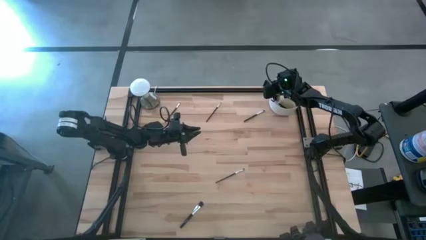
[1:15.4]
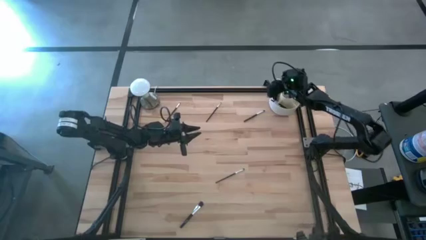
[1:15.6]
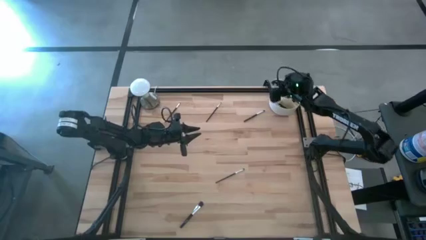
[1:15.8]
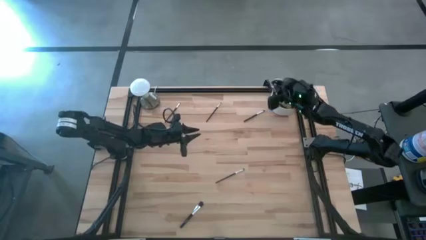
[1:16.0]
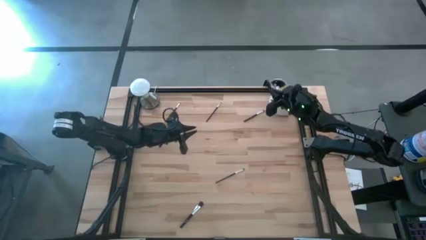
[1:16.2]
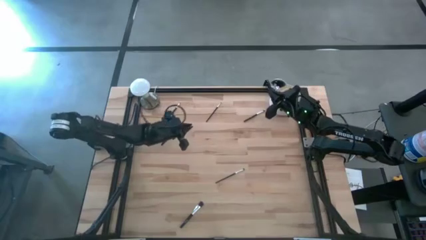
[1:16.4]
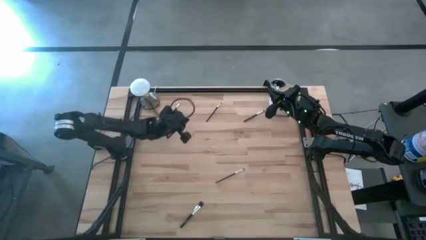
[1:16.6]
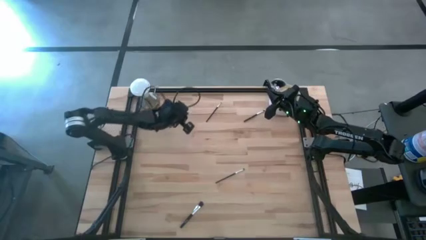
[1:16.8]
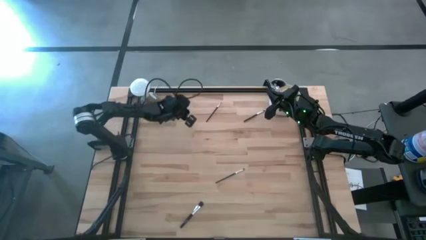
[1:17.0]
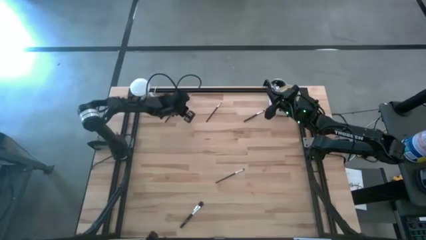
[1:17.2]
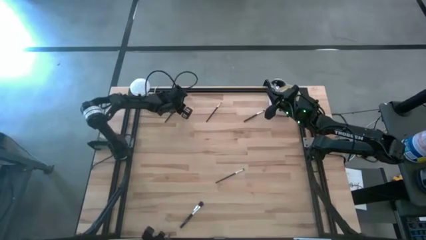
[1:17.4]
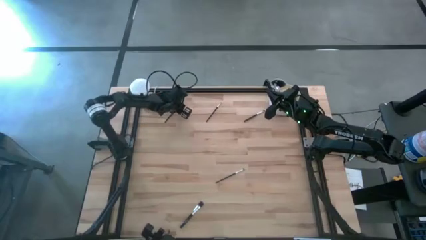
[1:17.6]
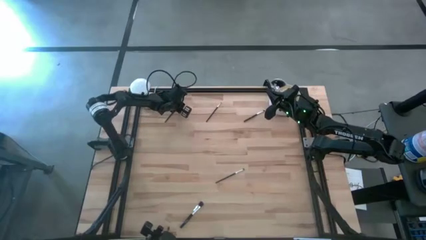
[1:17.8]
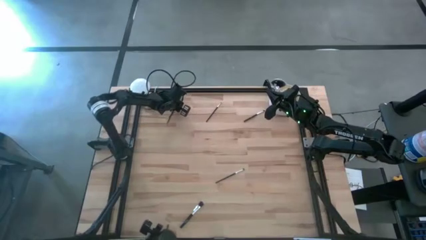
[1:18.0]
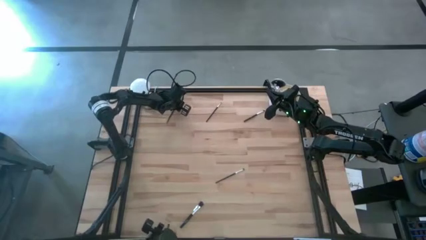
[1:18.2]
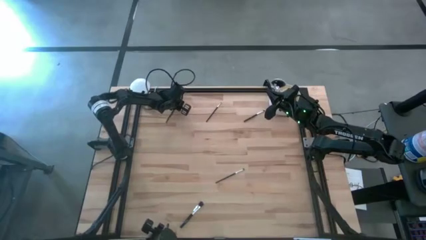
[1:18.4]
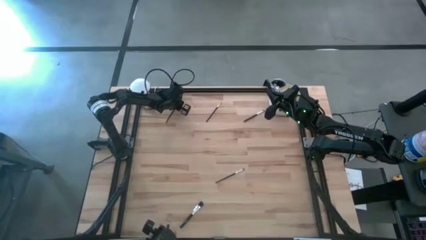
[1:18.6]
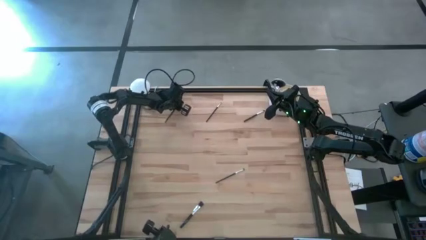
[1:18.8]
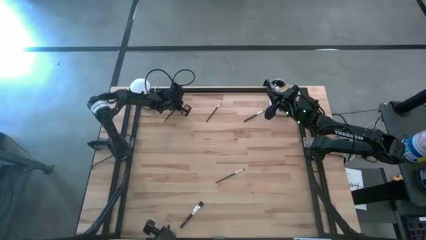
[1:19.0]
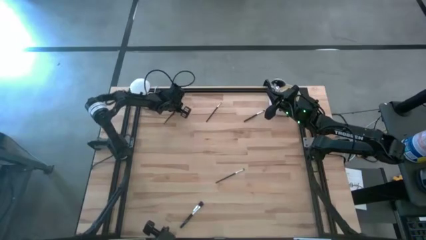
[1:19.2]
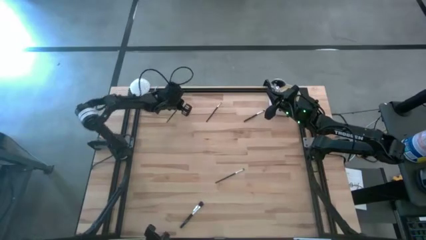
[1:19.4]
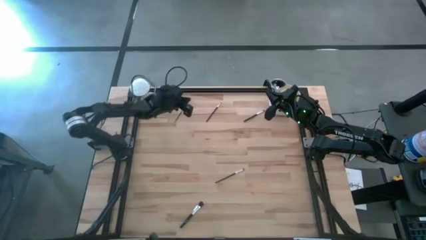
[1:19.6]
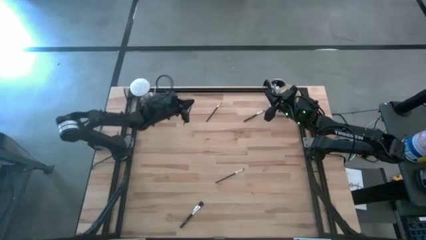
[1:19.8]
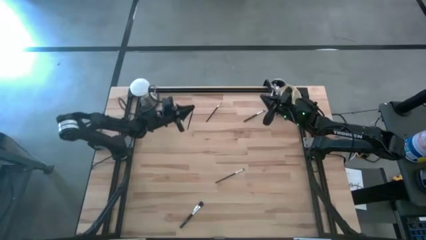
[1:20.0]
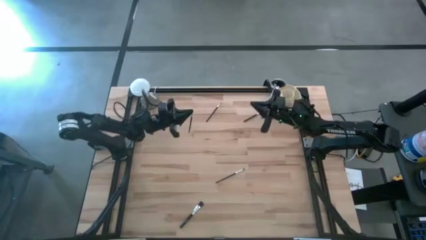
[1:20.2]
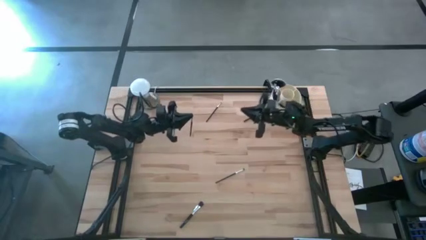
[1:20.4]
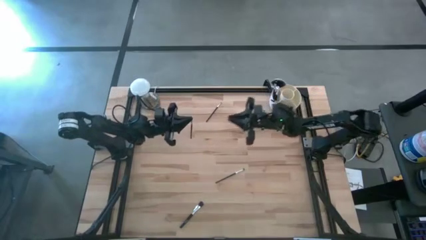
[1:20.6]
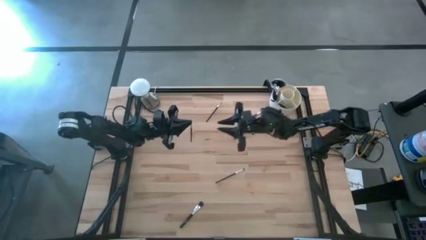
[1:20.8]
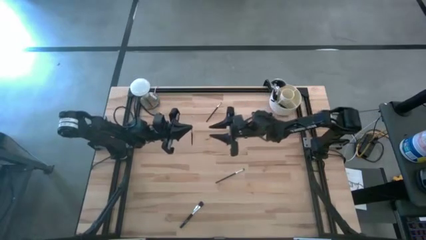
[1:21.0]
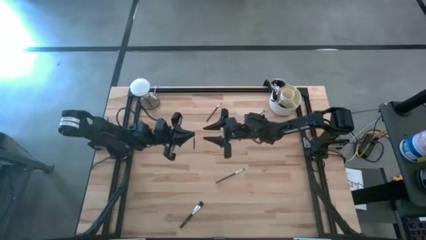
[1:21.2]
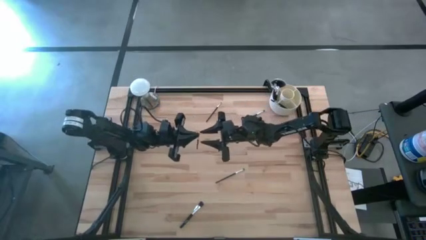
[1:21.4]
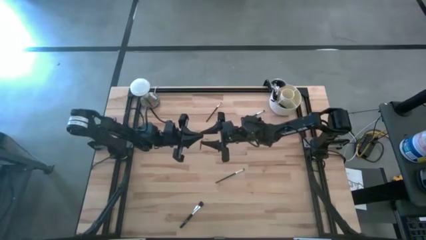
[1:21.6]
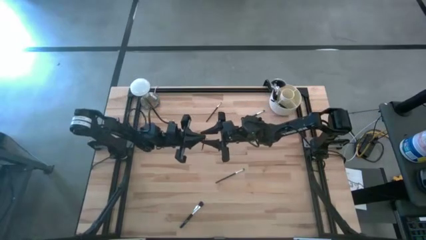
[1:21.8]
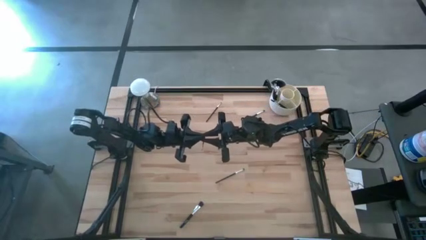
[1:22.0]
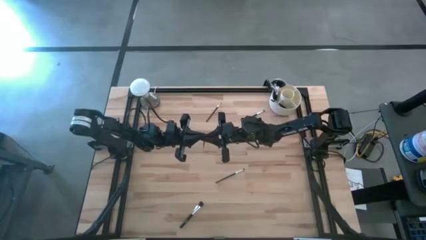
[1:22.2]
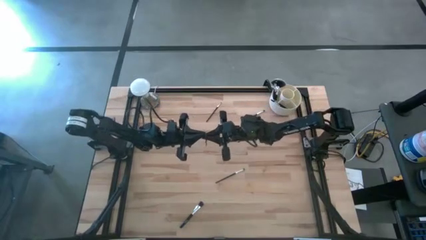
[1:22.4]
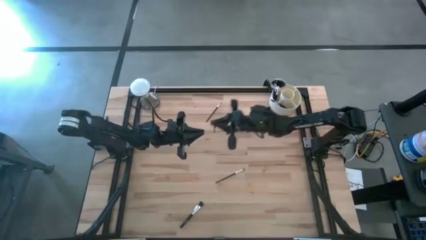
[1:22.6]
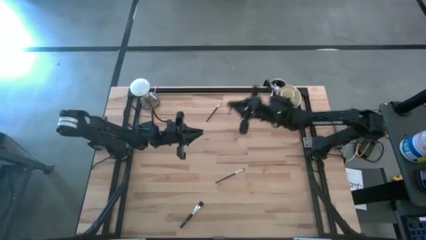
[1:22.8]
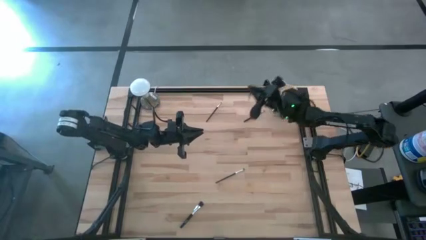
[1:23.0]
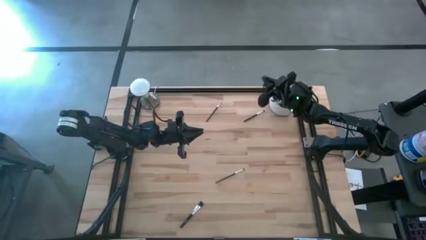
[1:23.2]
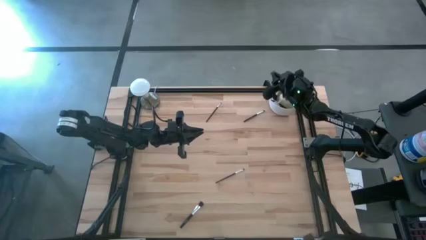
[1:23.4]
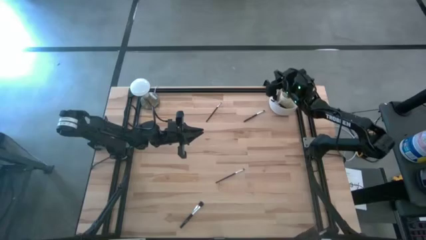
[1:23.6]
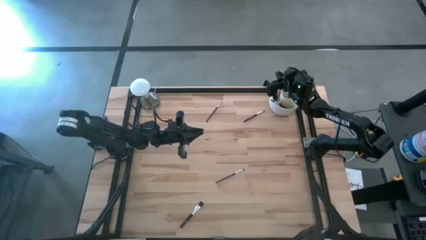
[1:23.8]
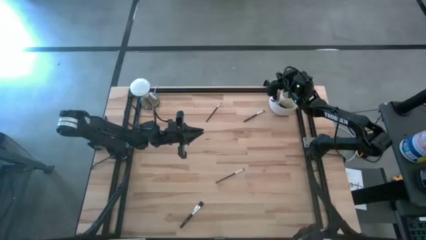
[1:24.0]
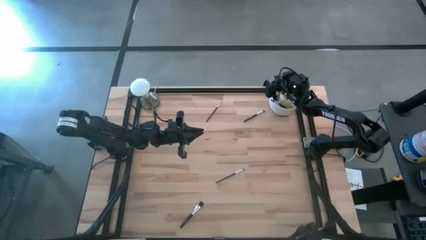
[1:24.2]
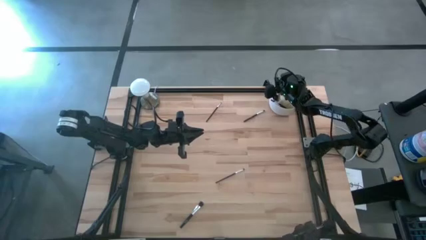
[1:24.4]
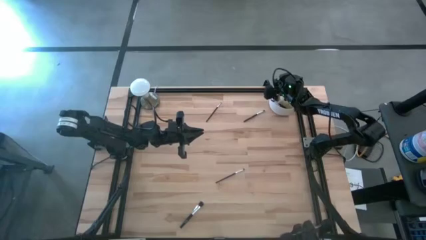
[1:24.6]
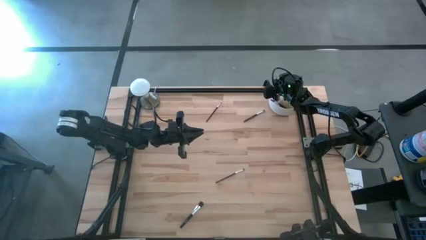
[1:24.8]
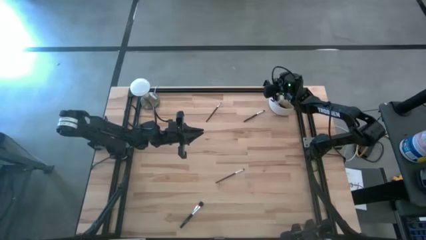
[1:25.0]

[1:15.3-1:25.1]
Task: Put items in baskets/containers
Put the black eyeshadow brush into the white organizer

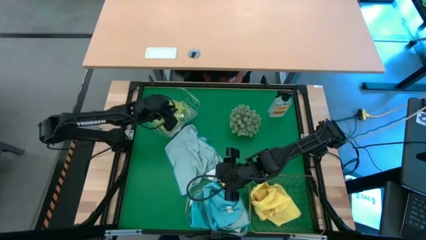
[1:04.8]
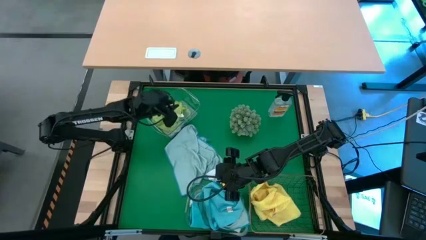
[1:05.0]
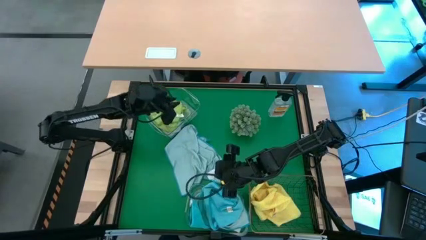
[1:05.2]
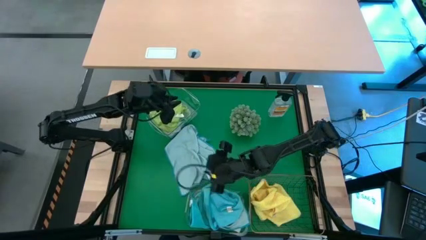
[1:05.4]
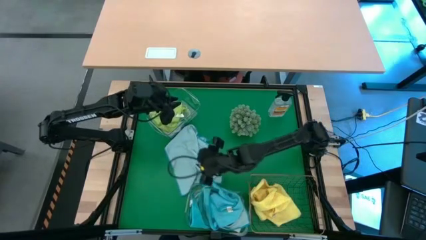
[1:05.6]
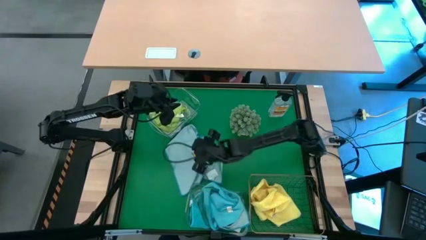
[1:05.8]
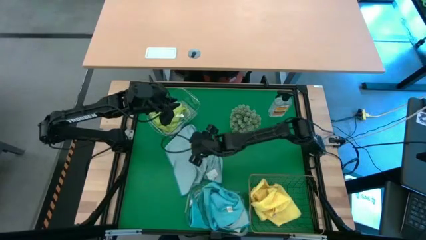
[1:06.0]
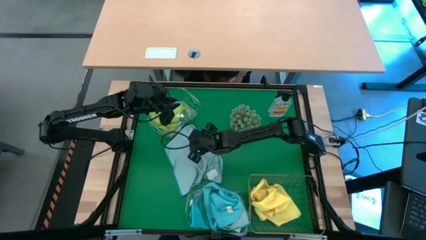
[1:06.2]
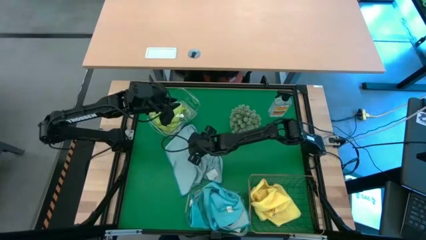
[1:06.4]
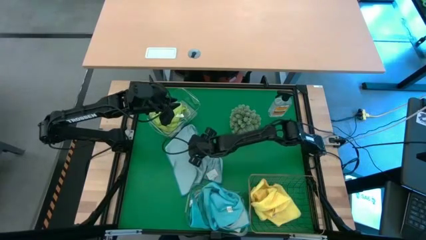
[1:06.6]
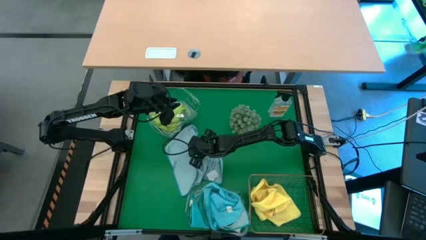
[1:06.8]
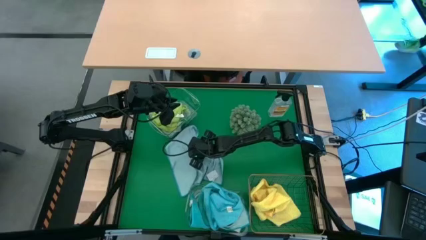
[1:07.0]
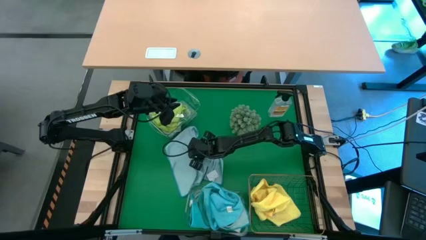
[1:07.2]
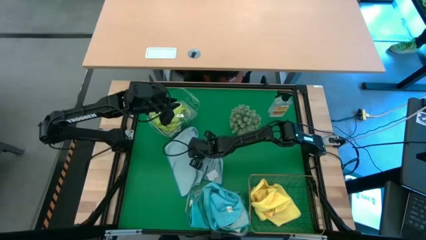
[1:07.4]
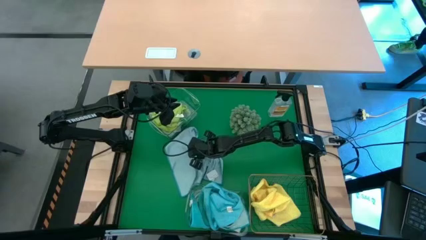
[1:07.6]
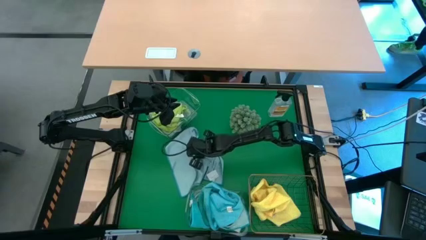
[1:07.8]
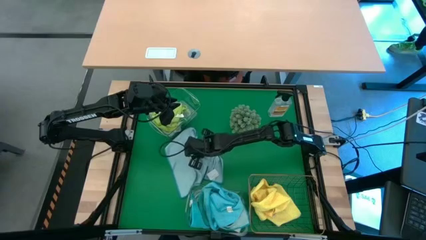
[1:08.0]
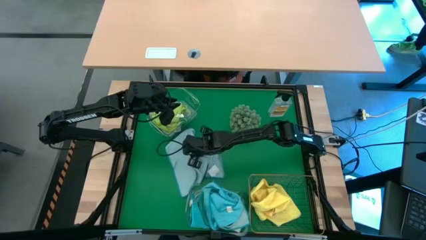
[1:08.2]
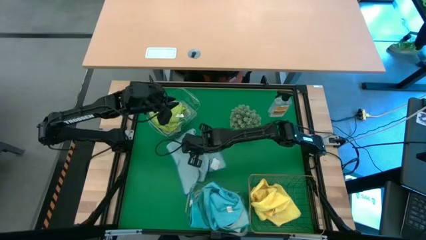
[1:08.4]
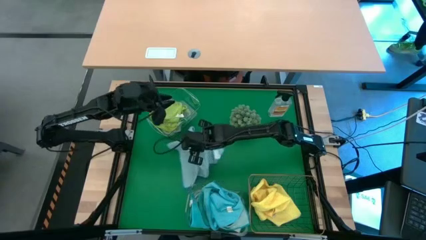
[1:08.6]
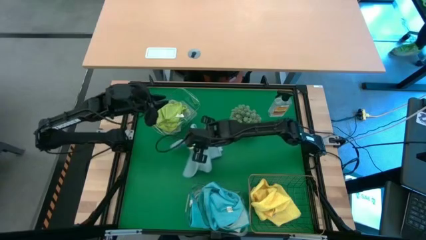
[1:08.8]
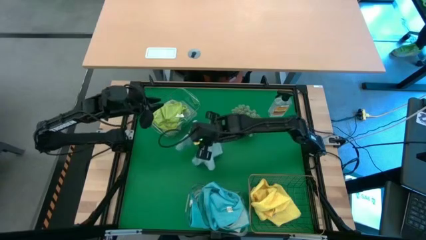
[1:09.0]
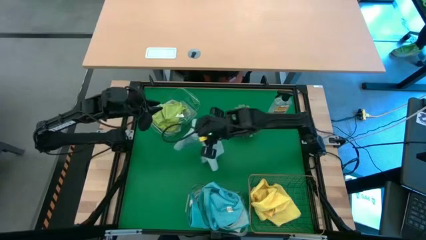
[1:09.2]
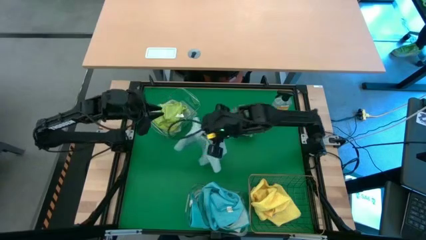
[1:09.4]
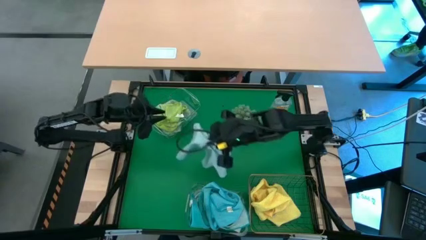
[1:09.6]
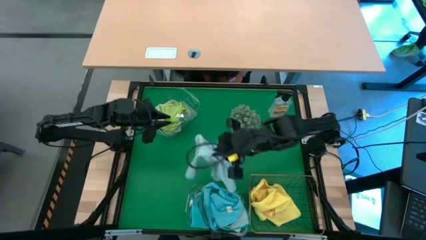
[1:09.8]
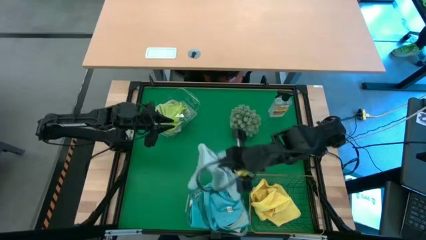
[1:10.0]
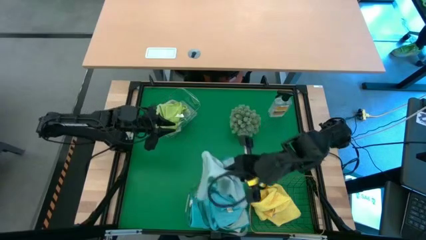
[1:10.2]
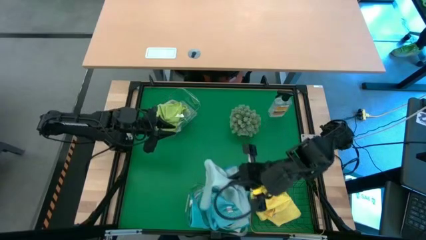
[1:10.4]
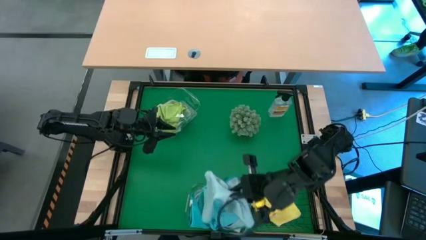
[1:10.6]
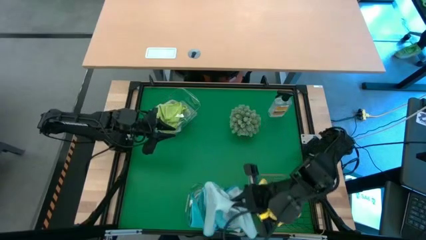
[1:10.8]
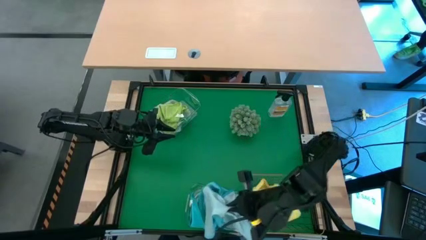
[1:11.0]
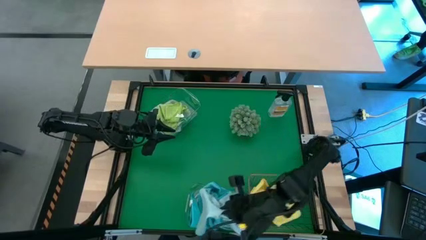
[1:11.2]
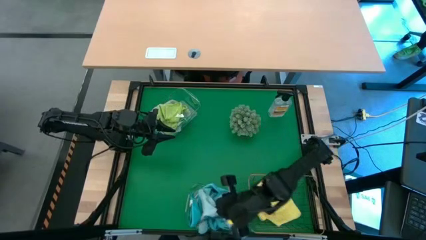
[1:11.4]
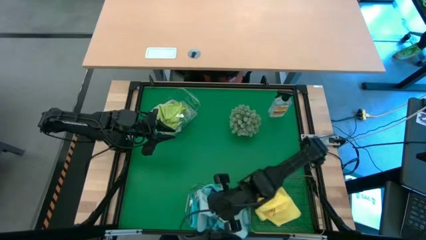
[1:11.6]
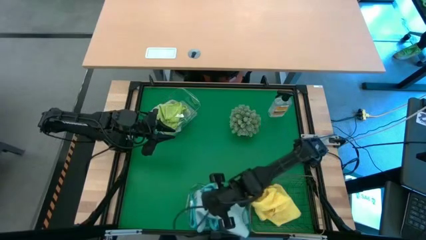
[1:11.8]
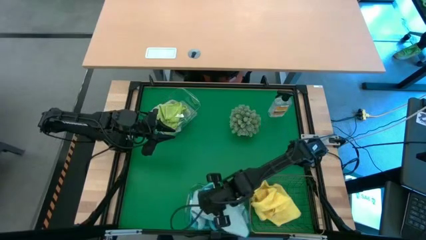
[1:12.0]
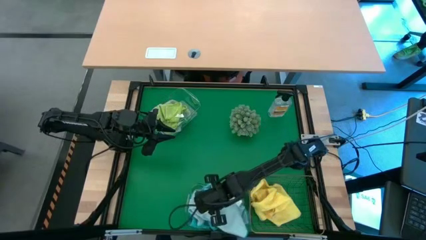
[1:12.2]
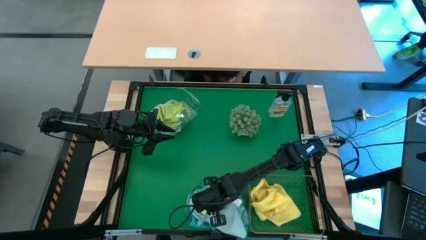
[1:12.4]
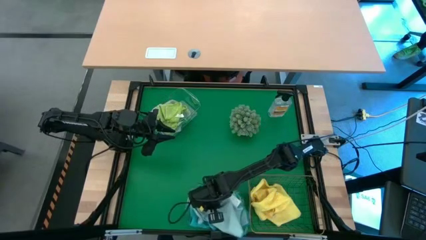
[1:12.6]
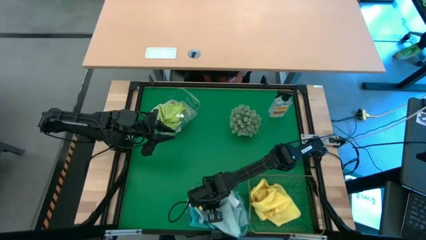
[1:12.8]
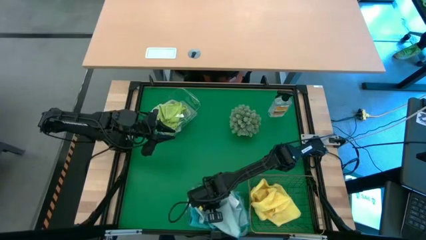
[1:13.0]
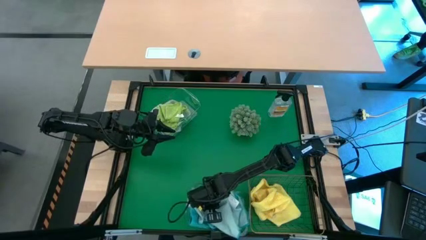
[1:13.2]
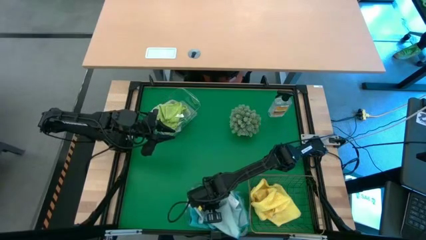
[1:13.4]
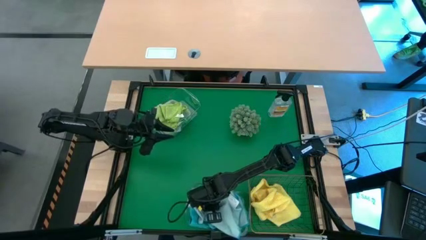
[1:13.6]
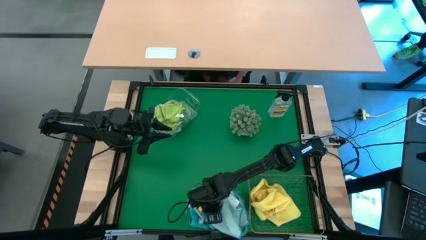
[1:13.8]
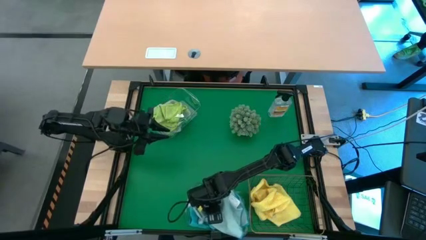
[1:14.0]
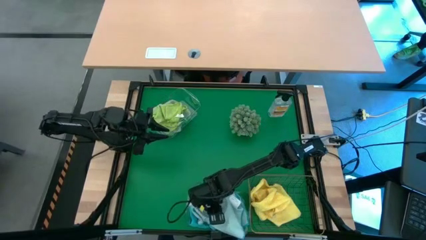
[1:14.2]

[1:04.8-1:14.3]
Task: Sort microfiber towel by color & place in baskets
Put the light blue microfiber cloth into the bottom transparent bin
